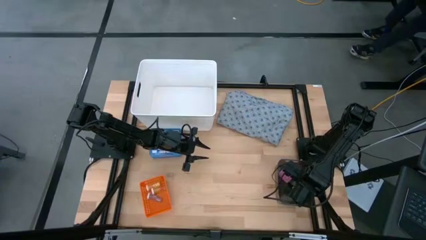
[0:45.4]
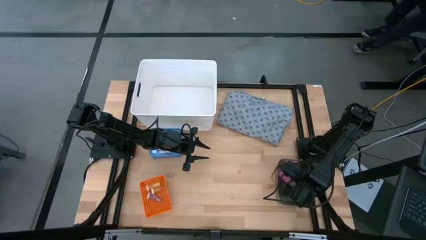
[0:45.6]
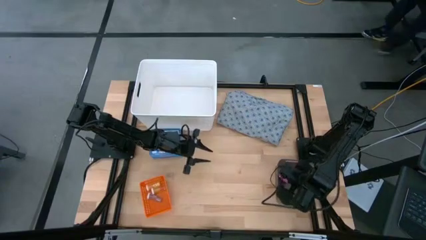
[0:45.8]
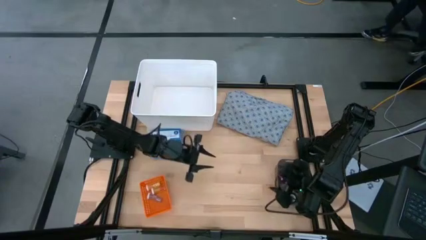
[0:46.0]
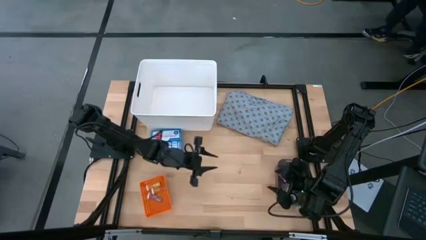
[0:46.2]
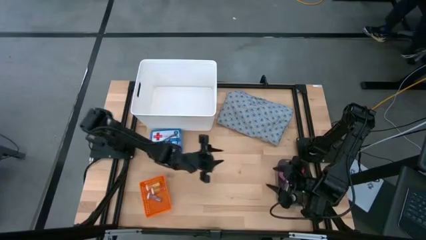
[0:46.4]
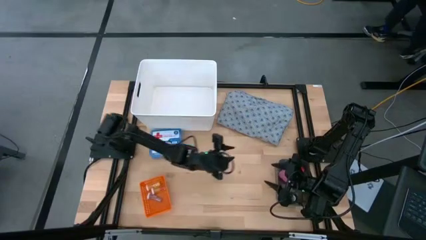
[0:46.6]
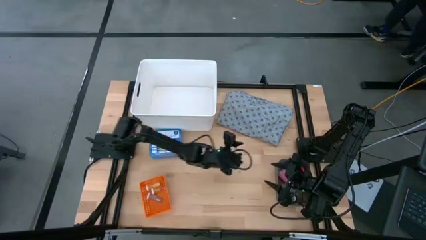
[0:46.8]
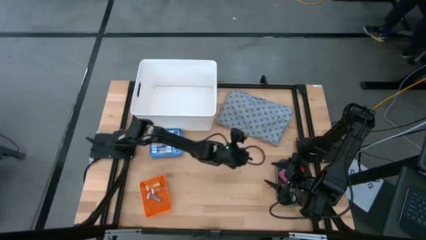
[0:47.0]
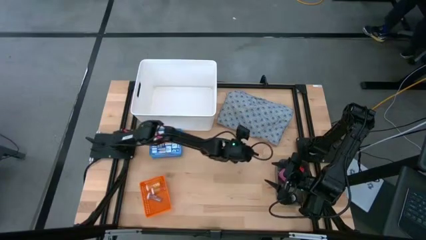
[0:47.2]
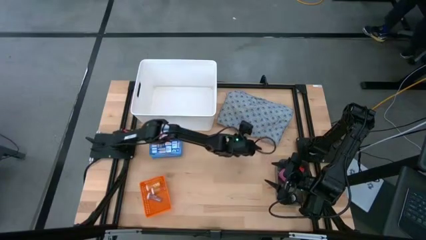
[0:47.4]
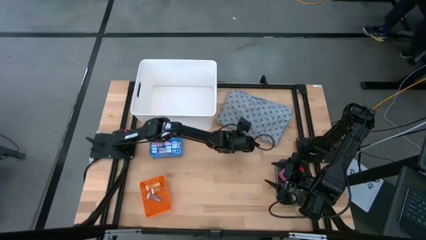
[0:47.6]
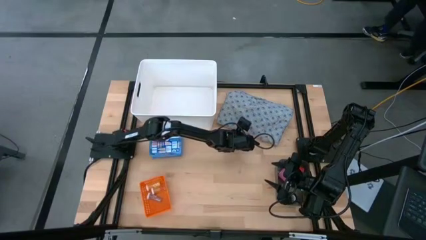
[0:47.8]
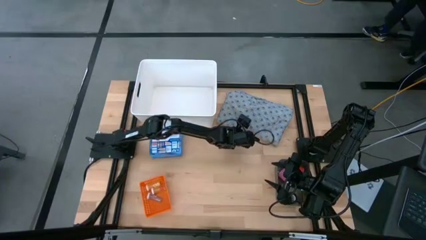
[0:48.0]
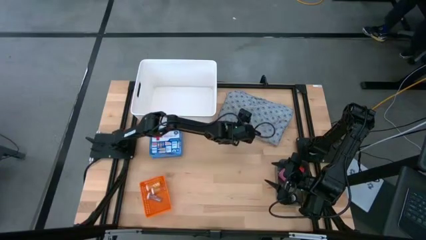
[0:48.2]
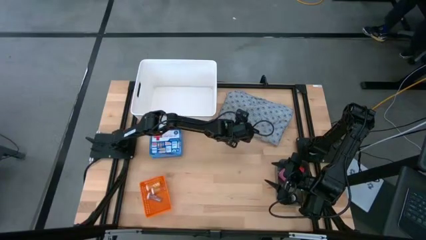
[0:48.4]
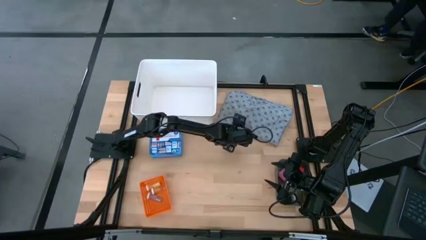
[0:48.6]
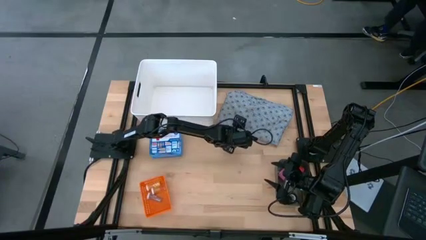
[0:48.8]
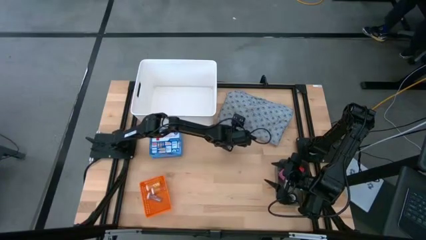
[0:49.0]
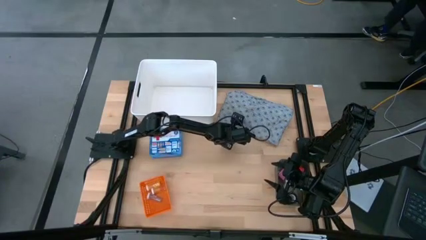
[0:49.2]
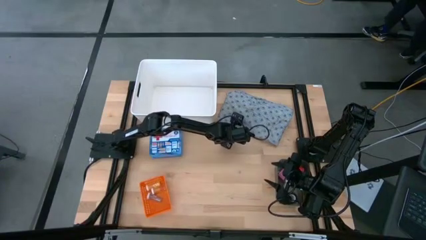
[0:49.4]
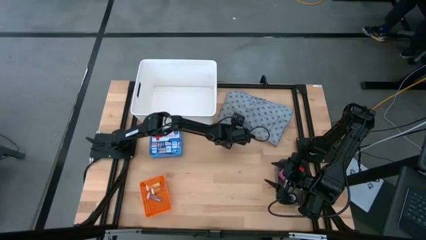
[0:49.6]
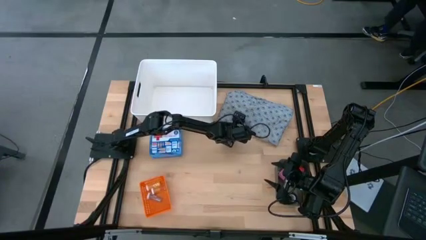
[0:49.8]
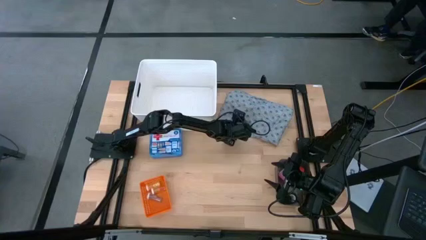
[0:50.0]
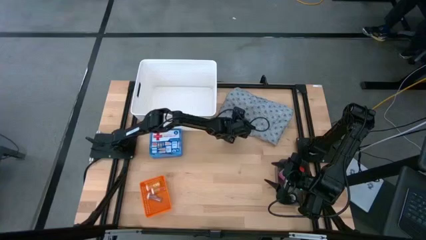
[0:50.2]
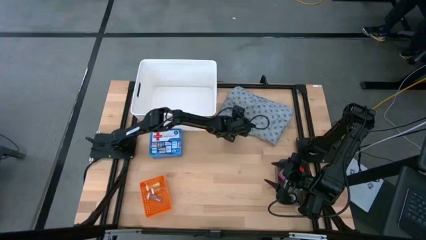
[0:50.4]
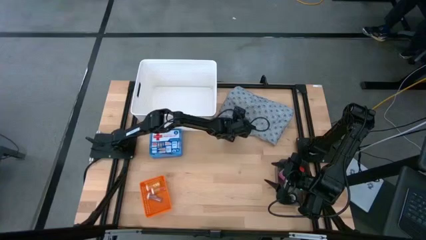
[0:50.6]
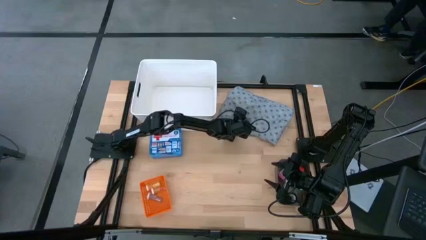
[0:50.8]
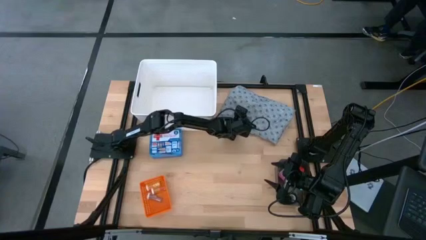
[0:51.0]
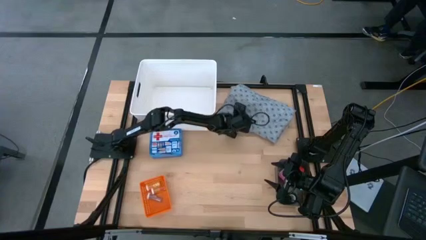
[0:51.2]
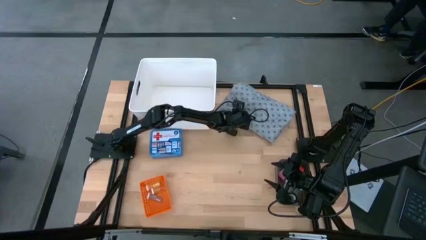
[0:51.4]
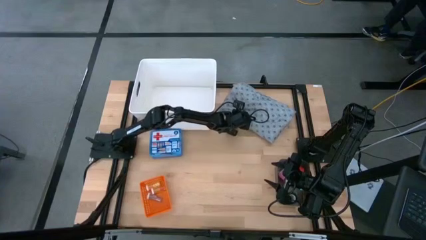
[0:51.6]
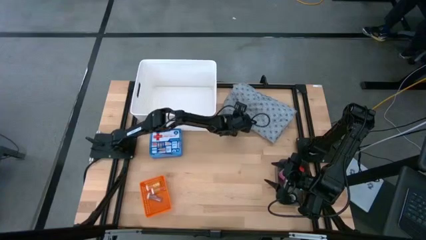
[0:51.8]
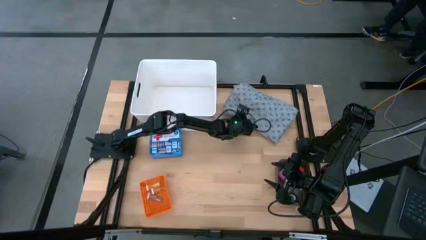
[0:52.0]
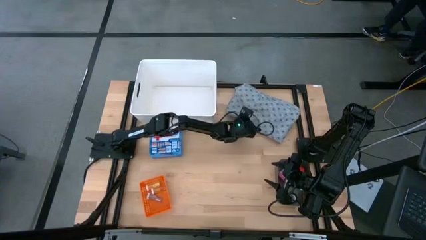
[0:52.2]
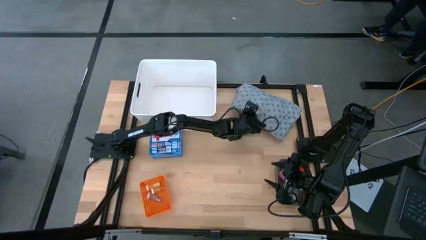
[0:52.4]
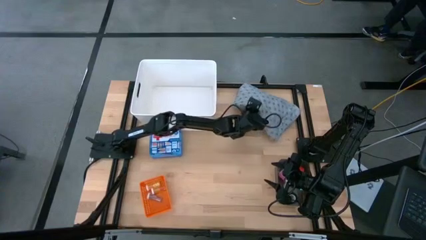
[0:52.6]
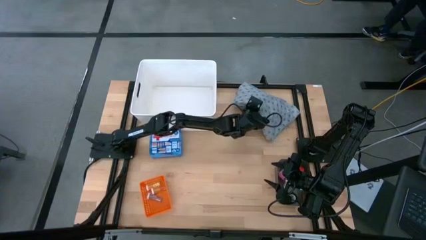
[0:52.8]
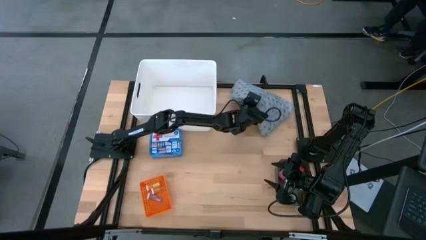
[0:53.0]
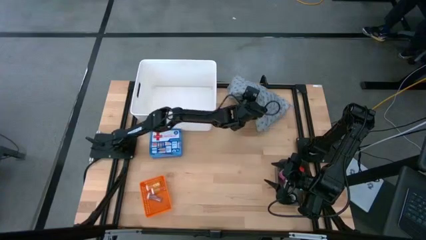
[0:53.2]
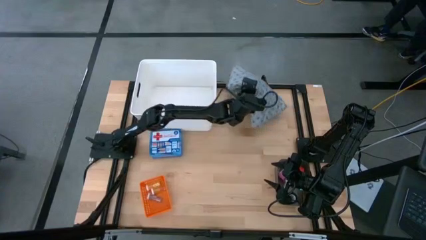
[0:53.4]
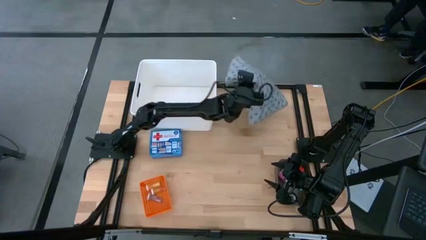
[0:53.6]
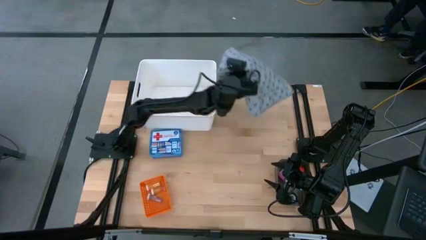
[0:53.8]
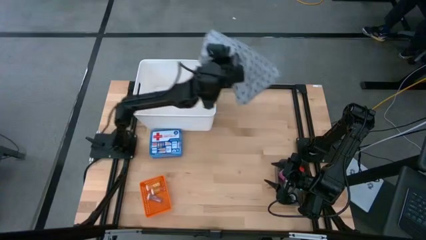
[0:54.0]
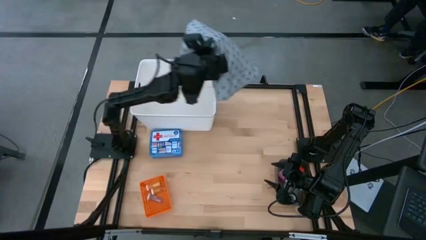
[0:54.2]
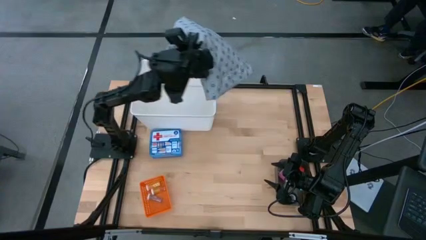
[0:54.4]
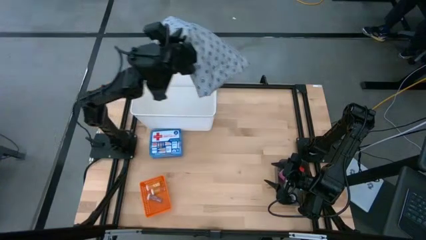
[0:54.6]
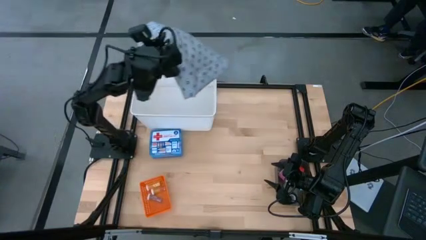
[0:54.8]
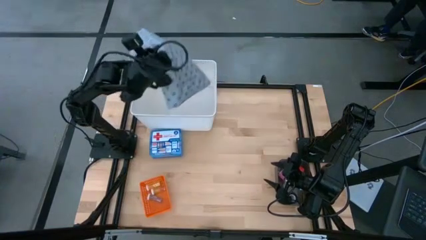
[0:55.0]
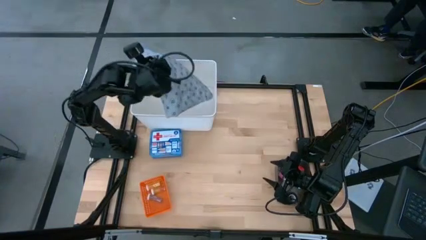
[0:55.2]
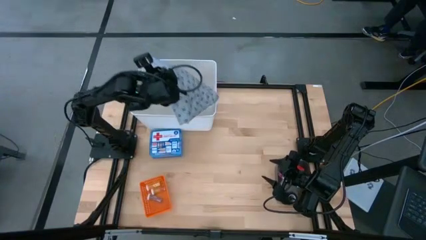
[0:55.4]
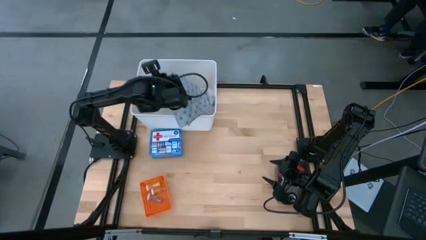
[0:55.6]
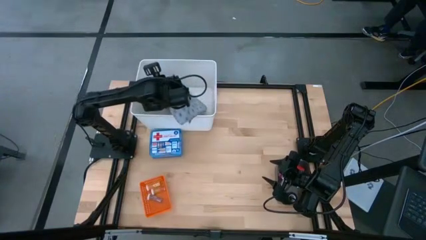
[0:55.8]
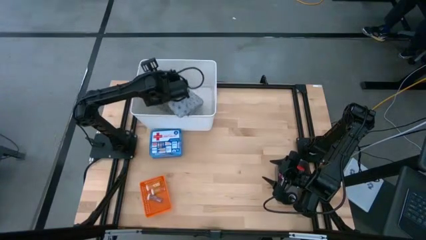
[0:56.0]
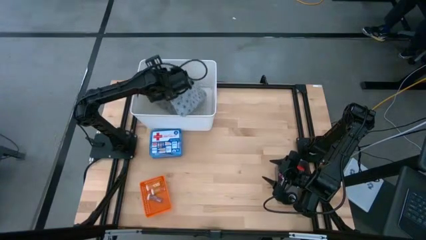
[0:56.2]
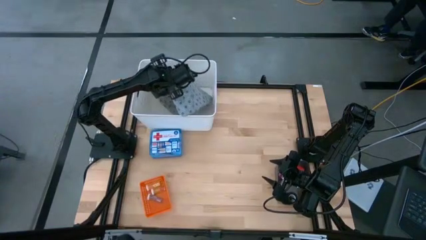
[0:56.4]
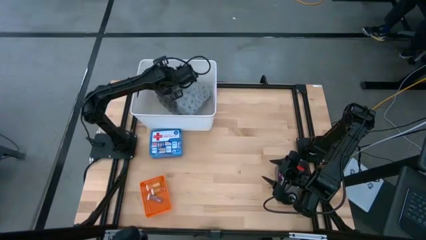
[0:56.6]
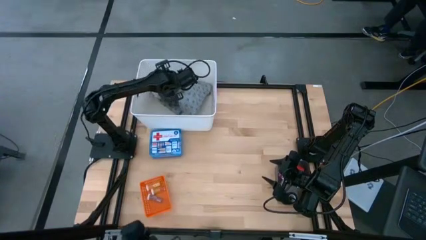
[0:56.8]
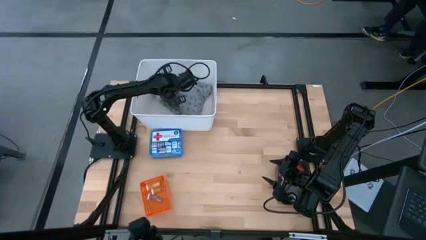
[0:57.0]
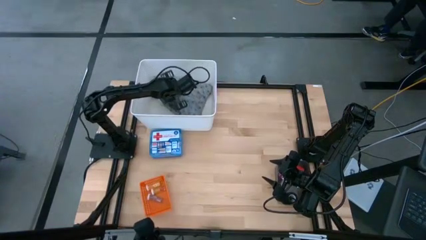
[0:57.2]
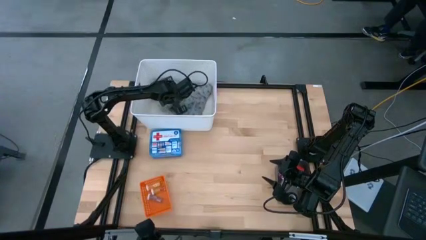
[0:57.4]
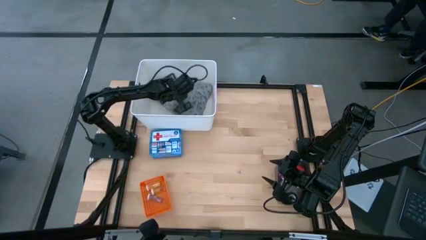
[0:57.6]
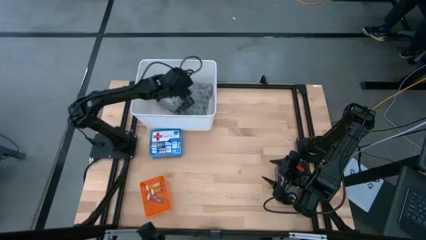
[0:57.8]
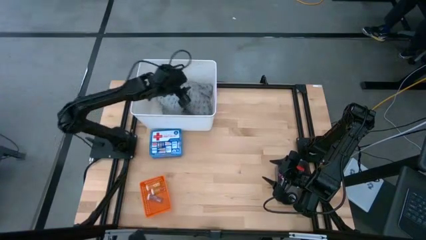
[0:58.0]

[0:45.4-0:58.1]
Task: Pick & place medical supplies in basket/bin
Put the patient gown into the white bin
